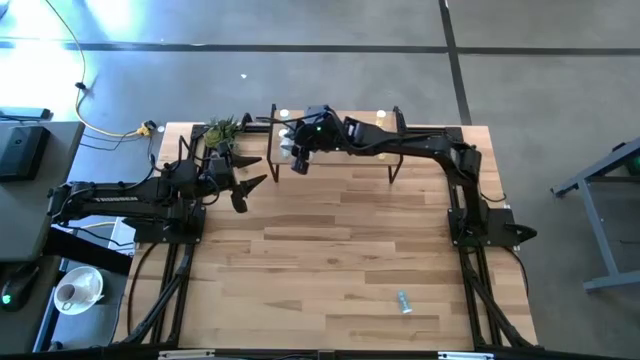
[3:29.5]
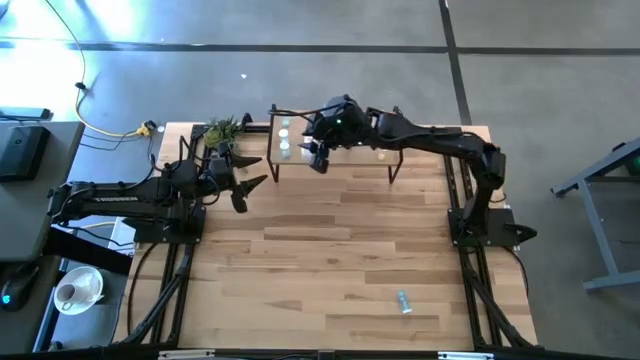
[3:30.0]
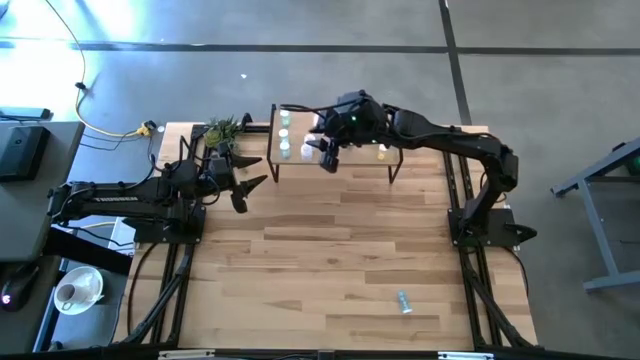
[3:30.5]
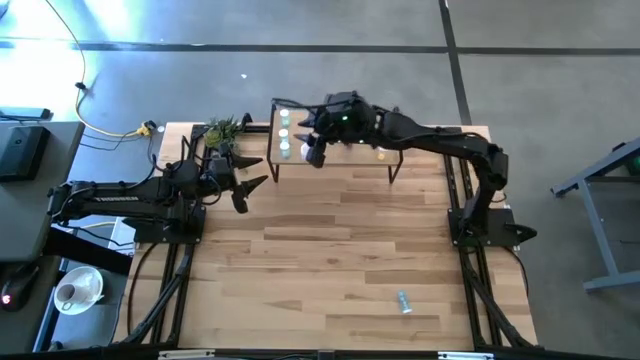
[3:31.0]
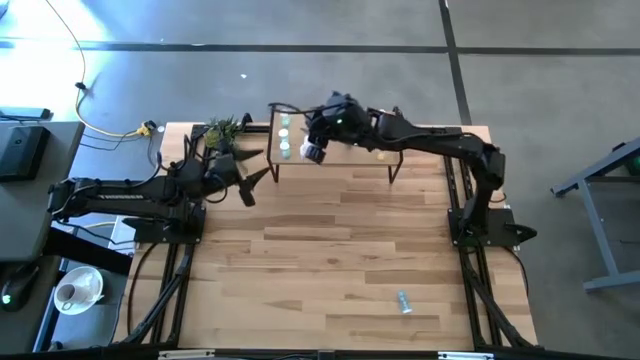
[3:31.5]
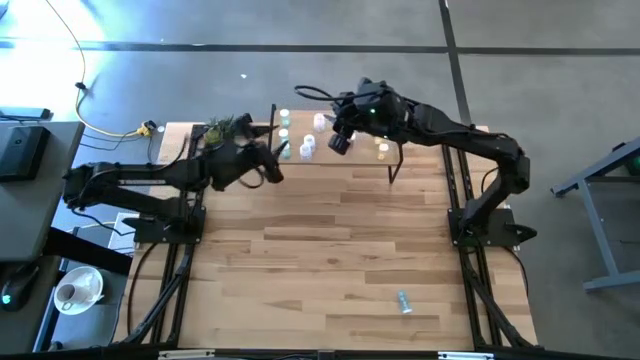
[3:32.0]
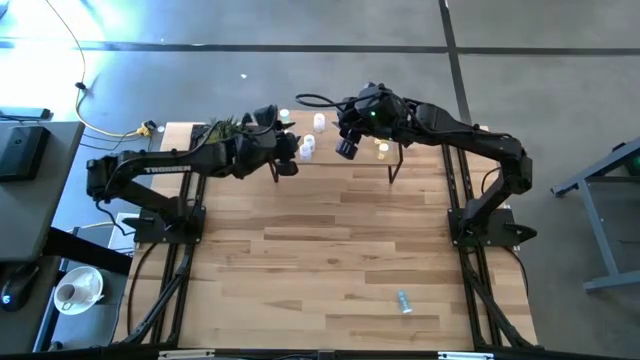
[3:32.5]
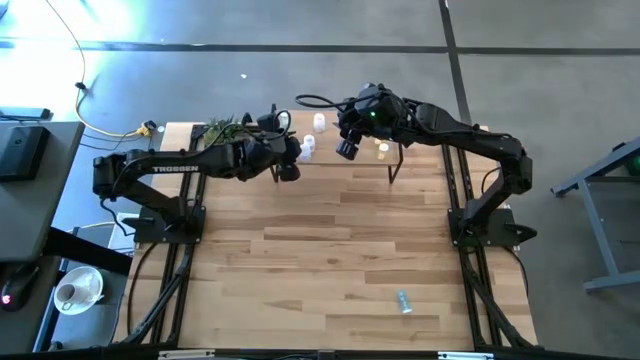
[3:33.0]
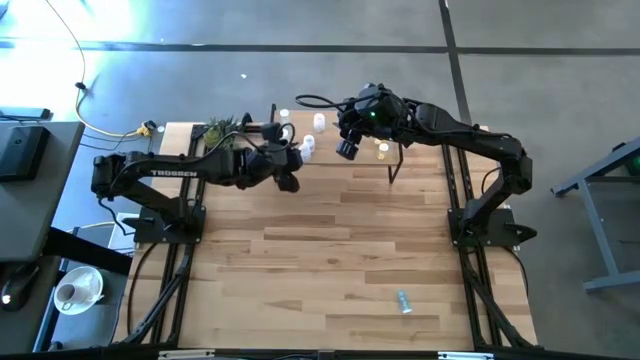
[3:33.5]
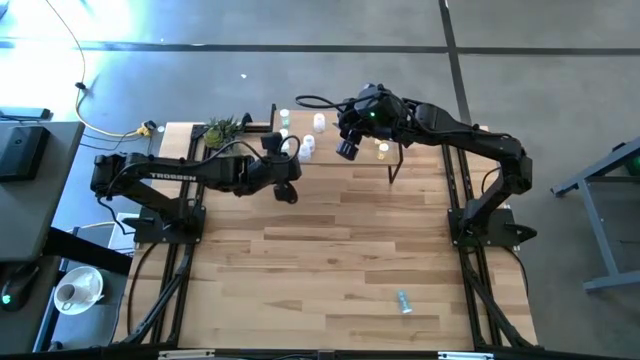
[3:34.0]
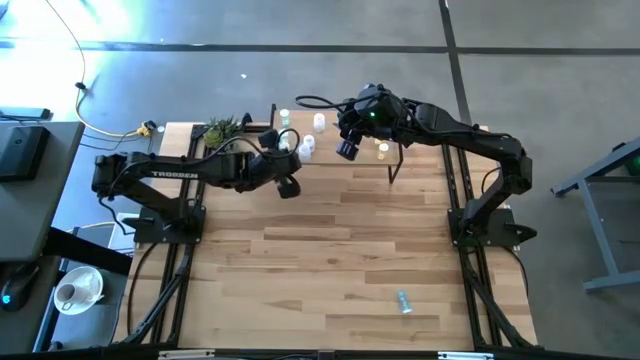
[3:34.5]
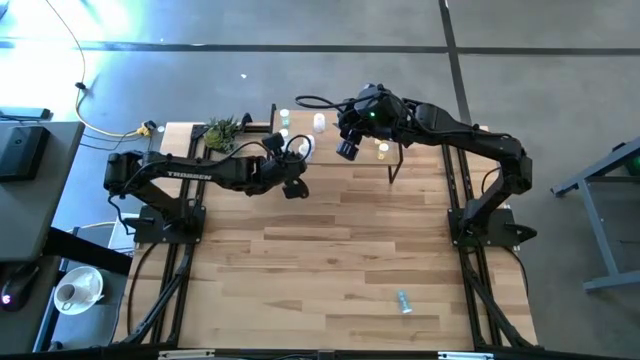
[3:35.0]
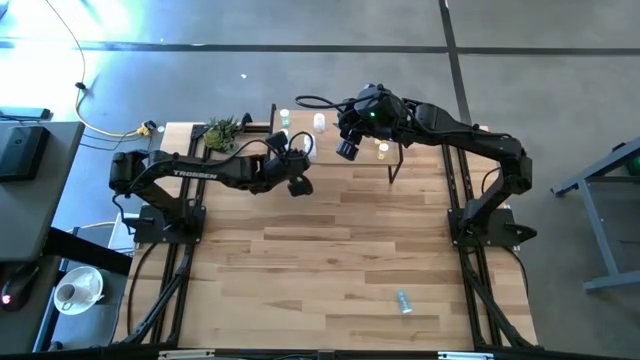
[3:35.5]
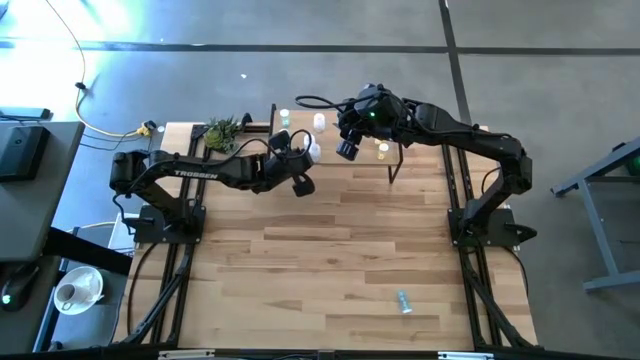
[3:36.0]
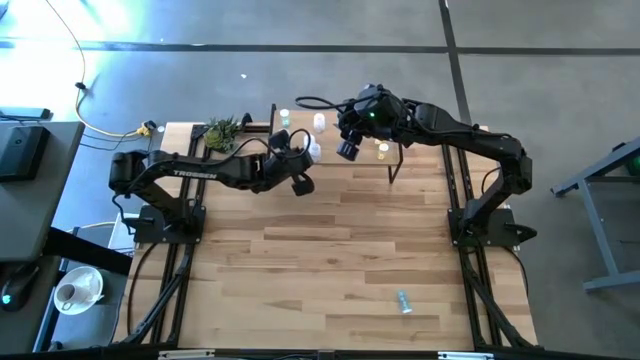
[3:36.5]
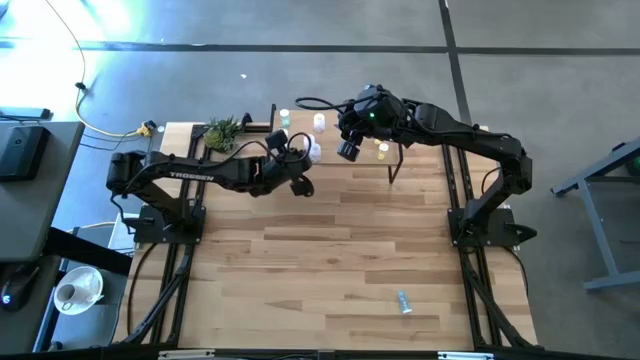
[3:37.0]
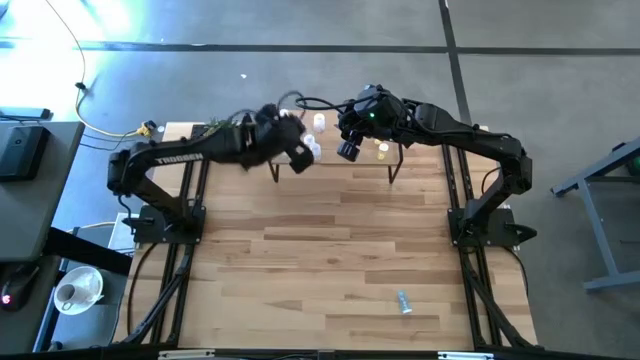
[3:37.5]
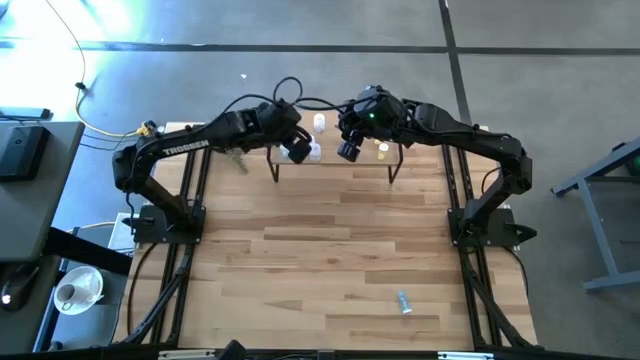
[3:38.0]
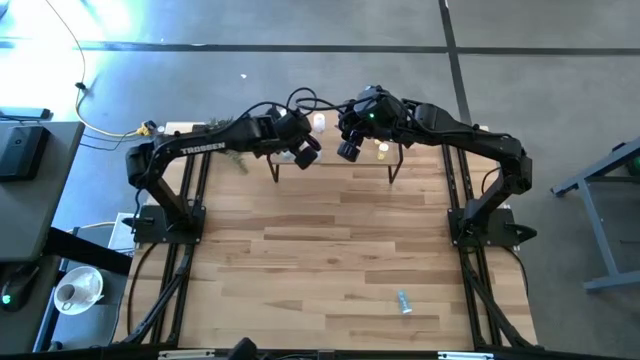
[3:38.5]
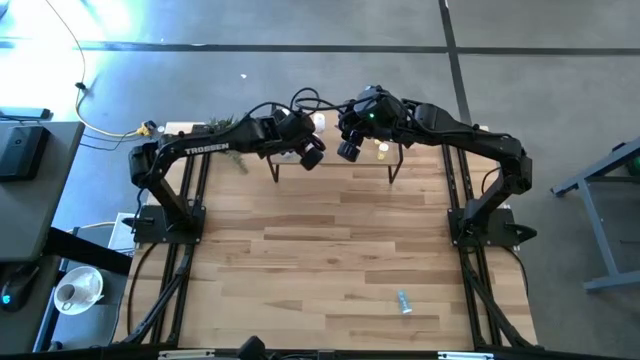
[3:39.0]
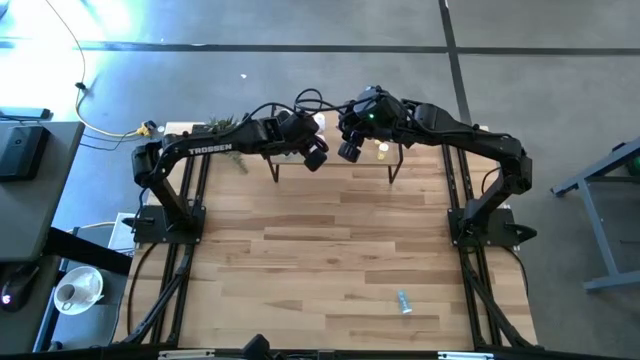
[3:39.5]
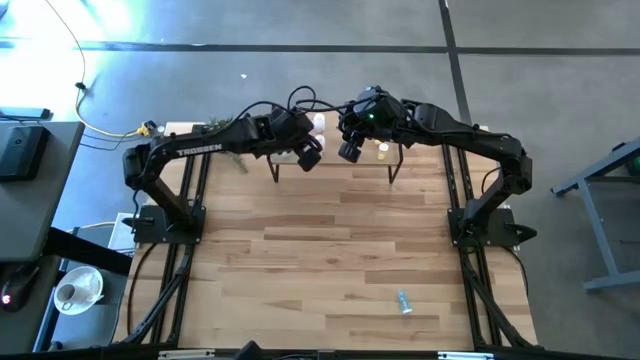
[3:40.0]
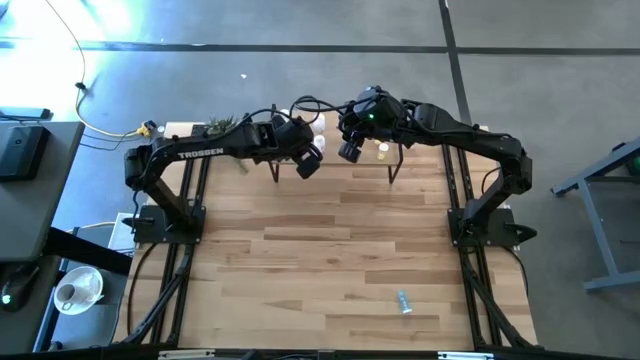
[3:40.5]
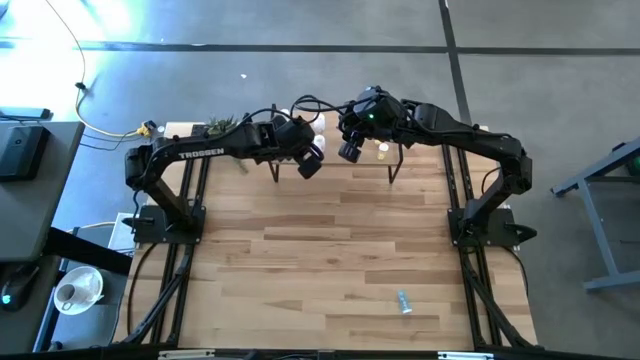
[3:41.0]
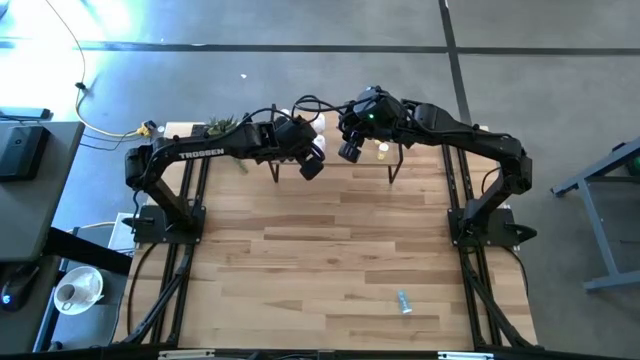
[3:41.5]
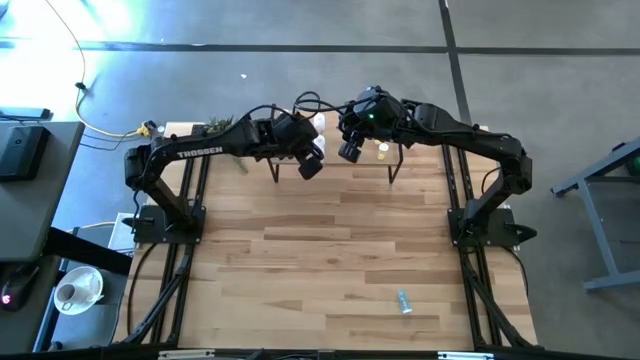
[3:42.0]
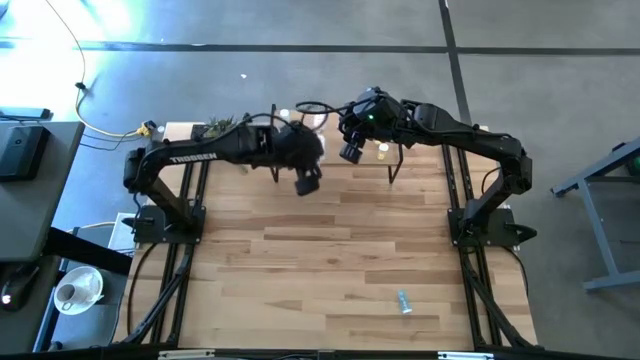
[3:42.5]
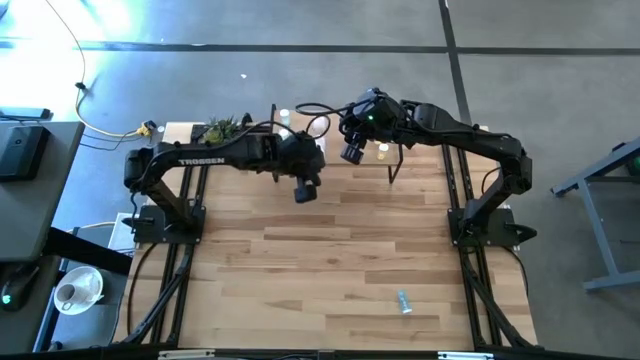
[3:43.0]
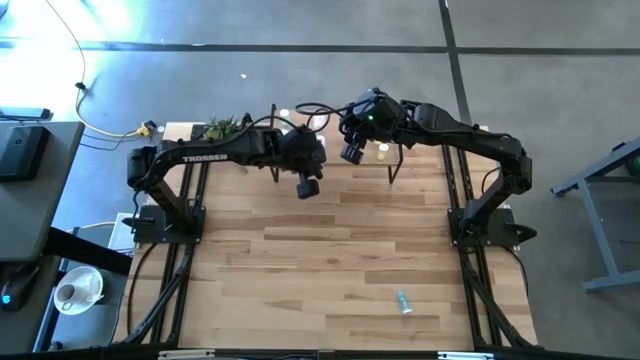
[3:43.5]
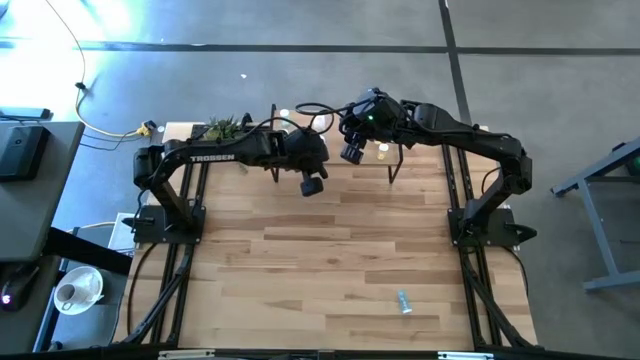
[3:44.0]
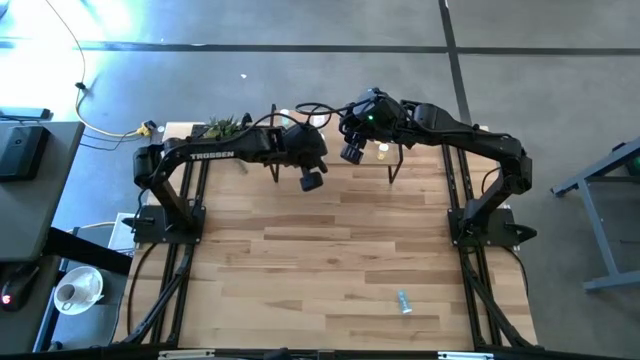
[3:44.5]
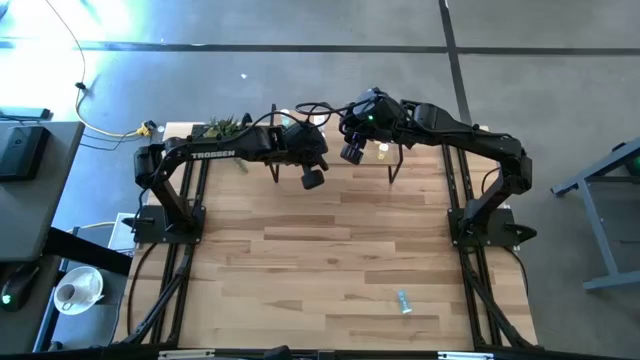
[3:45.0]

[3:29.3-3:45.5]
Task: Pick and place medicine bottles onto shelf by color
Adjust the transparent pill bottles on the shelf

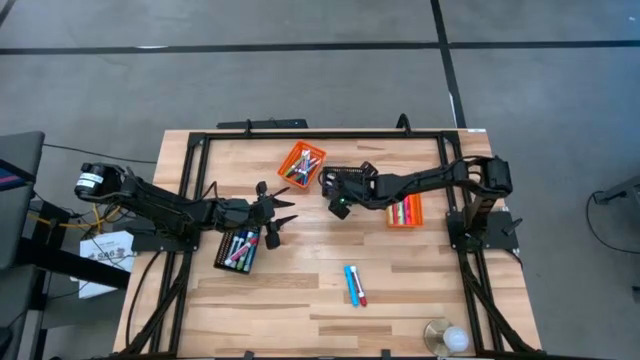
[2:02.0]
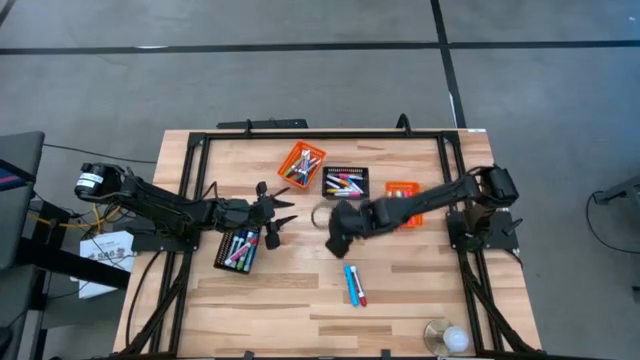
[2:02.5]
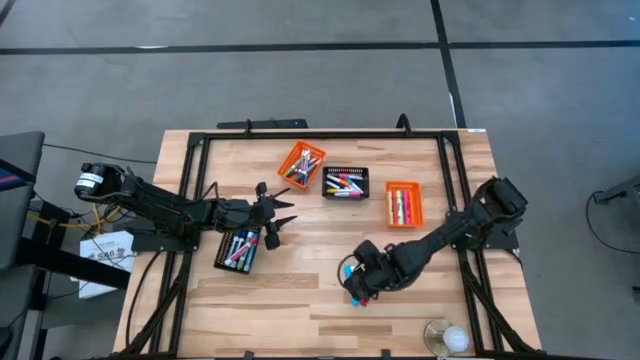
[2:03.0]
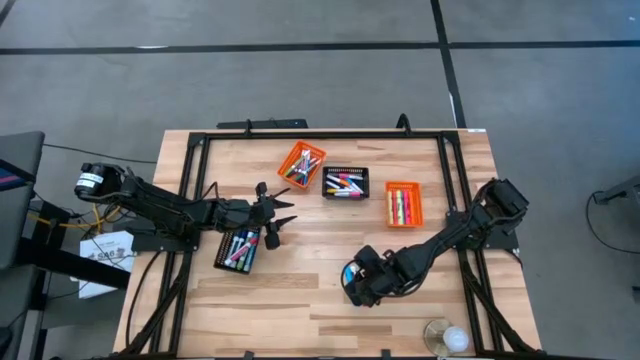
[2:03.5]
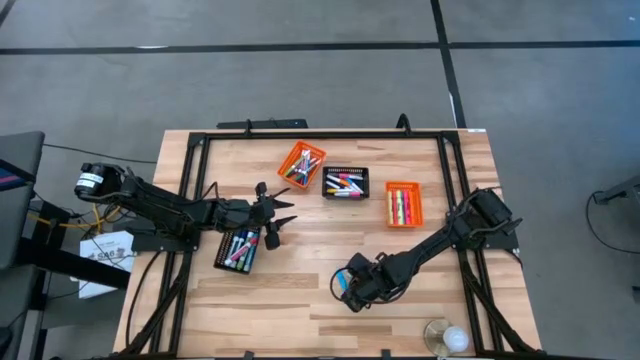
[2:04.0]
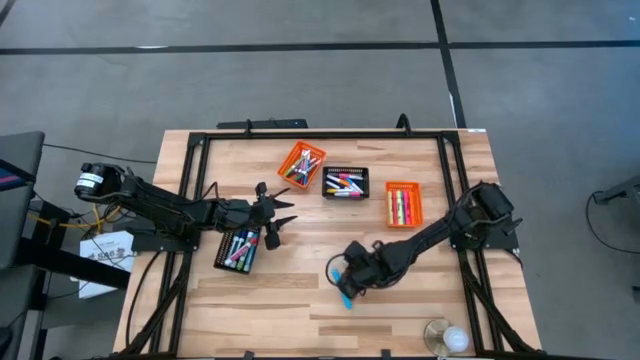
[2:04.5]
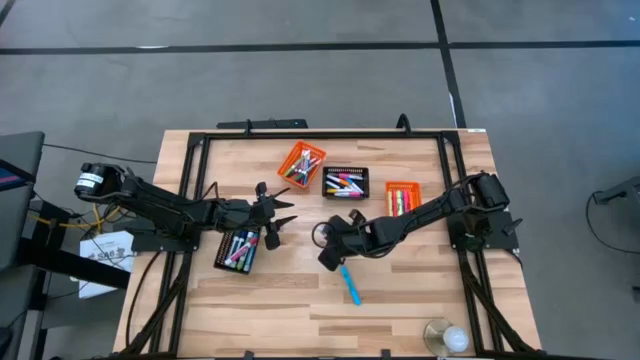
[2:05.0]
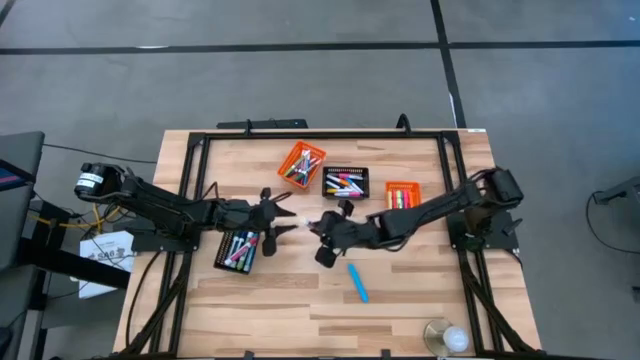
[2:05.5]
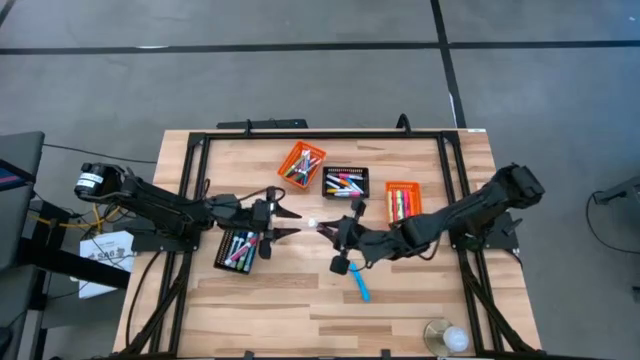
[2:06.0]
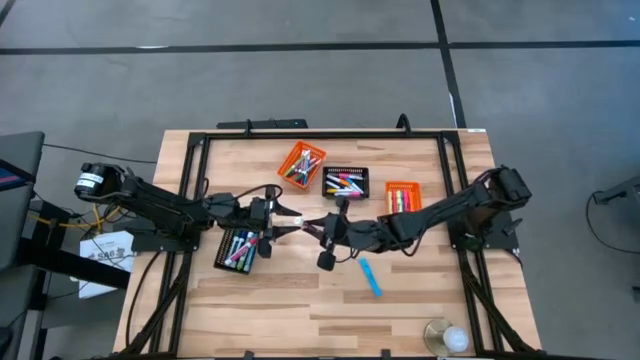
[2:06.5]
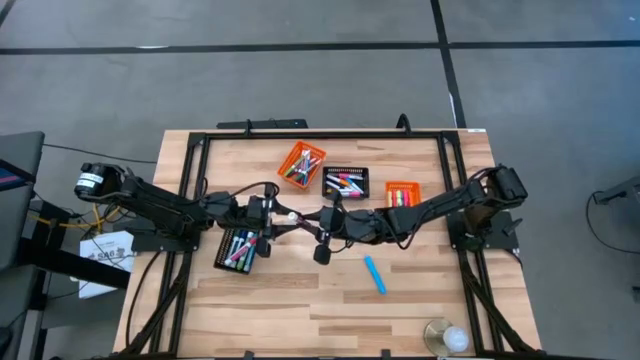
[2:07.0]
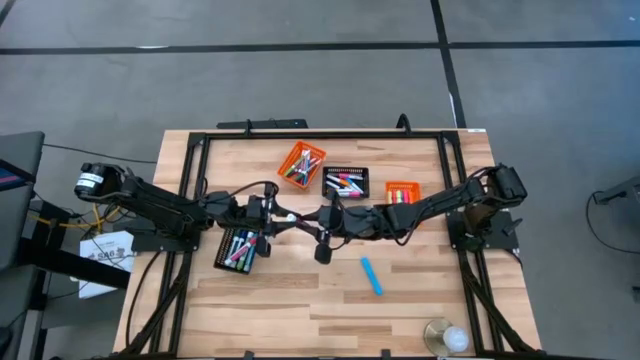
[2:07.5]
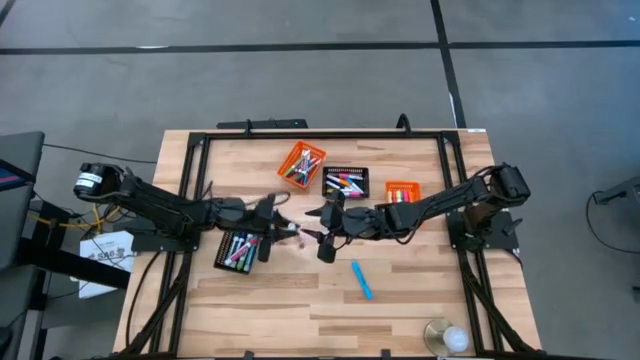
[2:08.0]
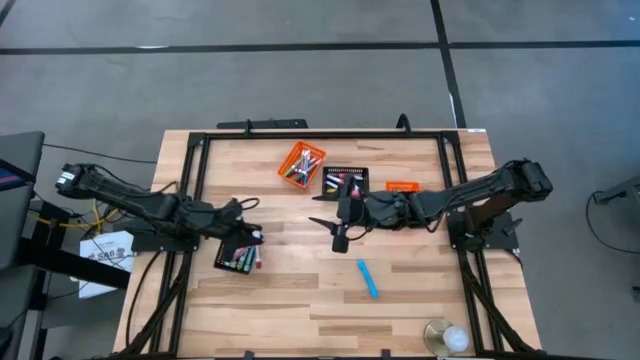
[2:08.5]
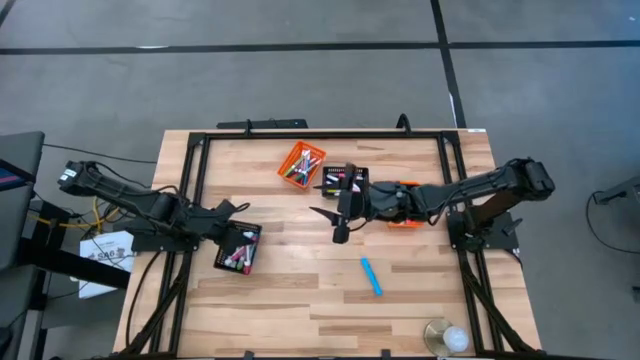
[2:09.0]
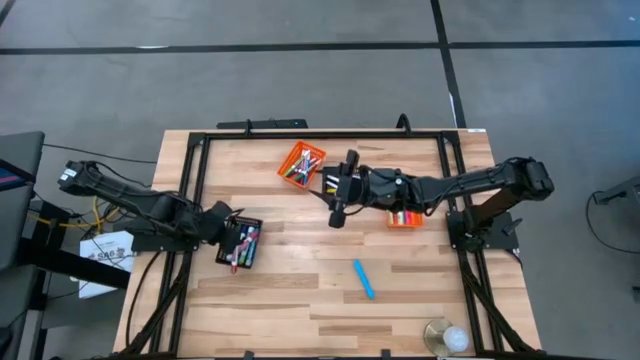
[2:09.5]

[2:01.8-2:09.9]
Task: Pick & Place Markers
Put the red marker into the bottom black bin
